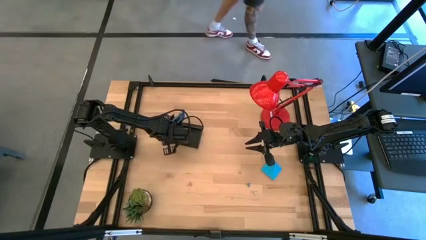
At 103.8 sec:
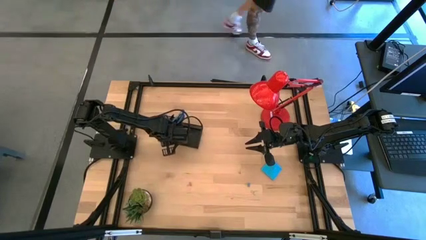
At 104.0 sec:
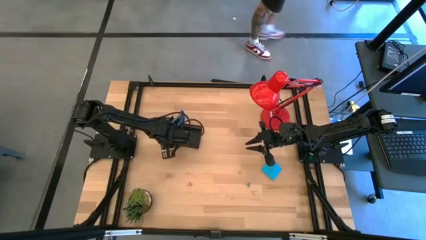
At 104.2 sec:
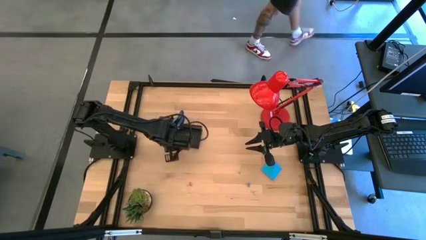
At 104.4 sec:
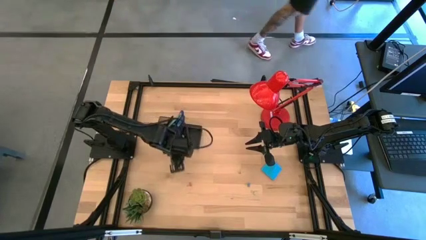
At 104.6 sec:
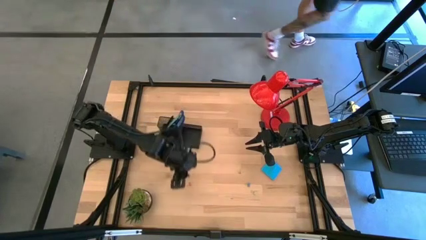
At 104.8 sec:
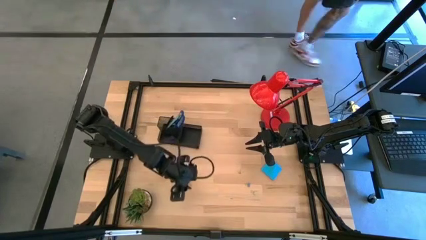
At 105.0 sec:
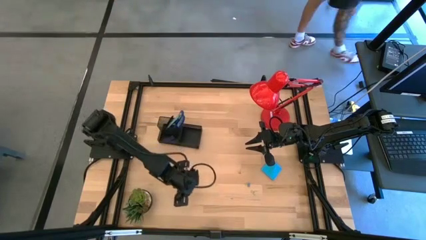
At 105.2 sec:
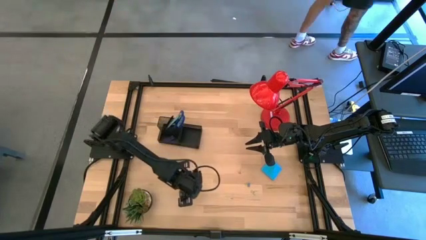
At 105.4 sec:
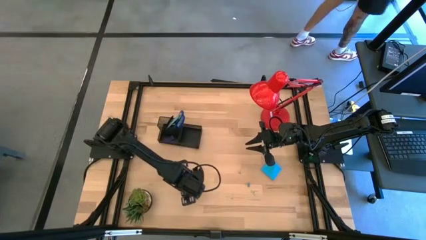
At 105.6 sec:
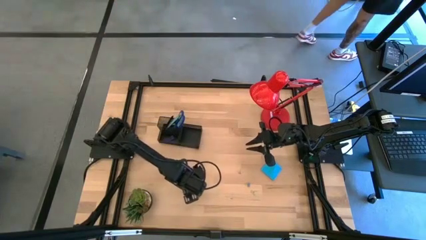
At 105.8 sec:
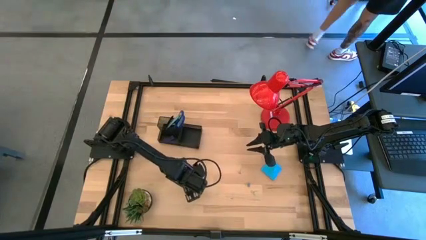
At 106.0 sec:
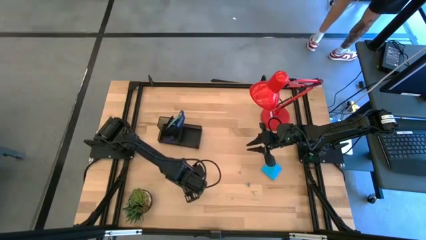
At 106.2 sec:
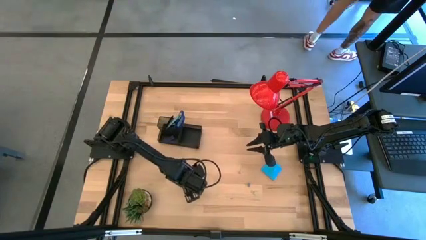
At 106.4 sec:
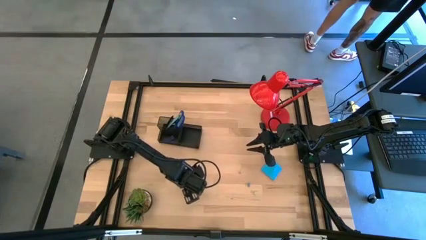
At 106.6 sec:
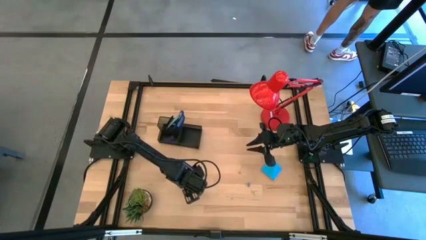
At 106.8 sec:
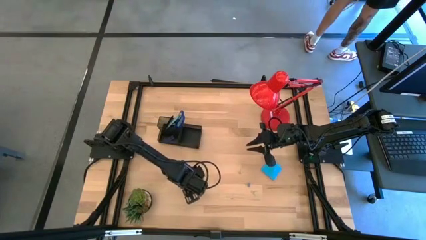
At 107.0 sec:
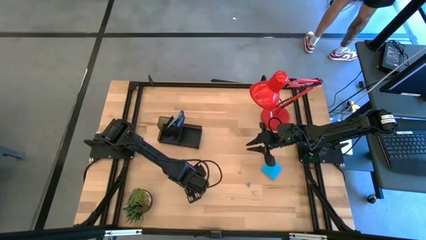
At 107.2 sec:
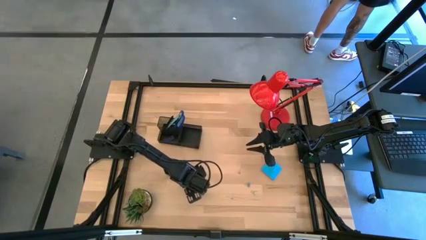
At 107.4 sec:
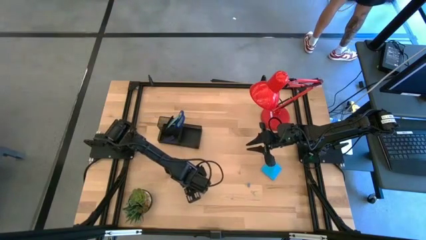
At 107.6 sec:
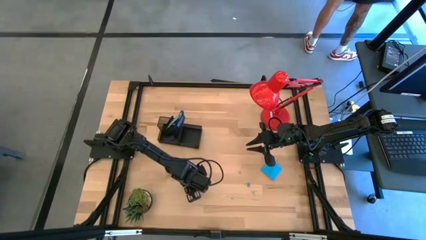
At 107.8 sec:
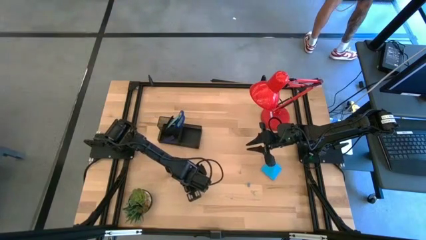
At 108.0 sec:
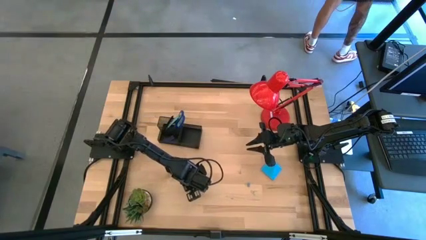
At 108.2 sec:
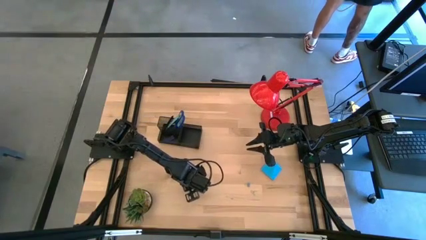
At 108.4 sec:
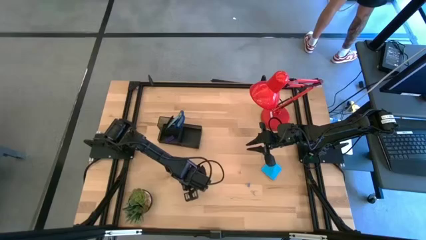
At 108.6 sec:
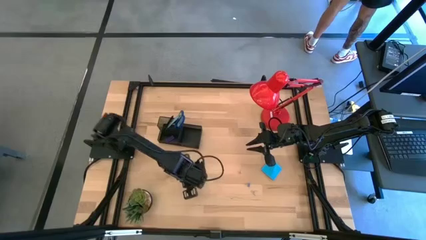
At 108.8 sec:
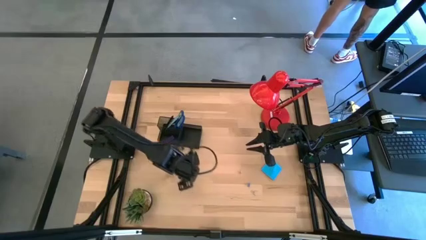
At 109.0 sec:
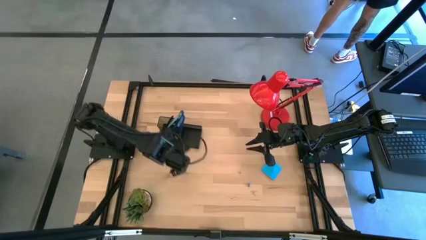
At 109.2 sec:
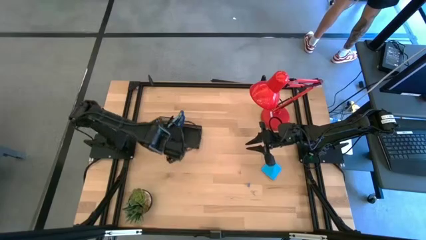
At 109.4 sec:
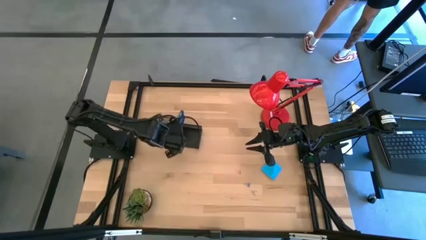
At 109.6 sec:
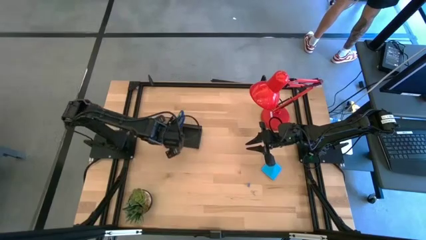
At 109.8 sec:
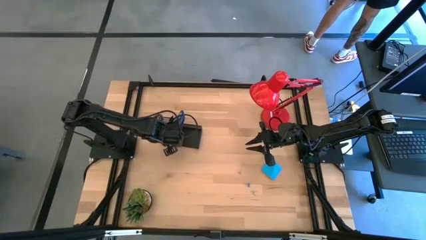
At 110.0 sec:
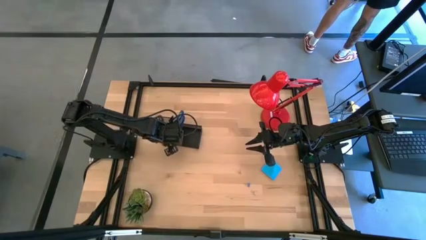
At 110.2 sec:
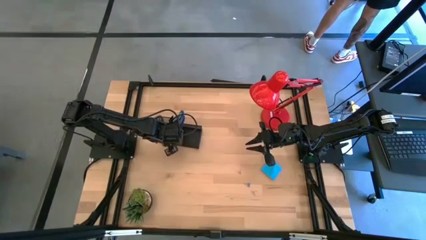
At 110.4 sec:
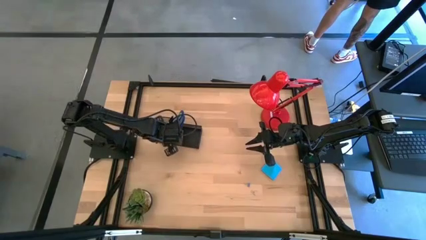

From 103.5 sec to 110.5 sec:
Task: Pick and place office supplies into organizer
Put the pink binder clip into the black desk organizer

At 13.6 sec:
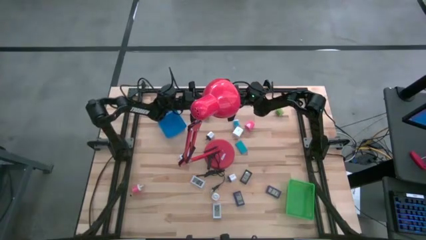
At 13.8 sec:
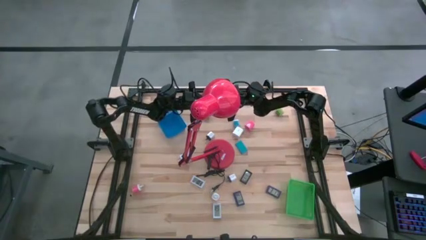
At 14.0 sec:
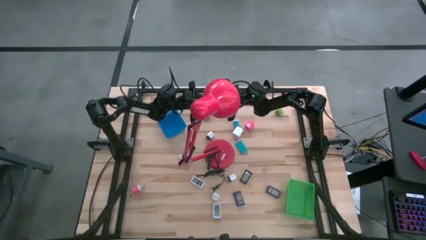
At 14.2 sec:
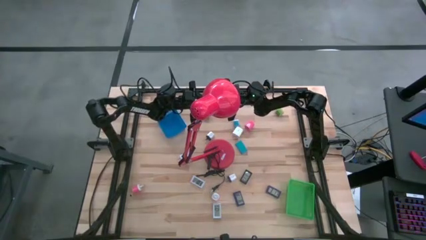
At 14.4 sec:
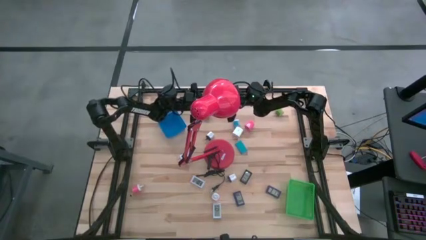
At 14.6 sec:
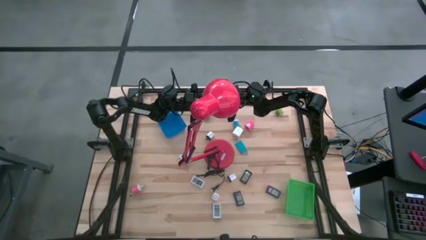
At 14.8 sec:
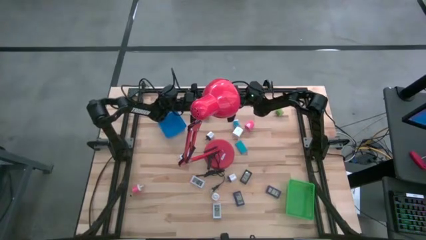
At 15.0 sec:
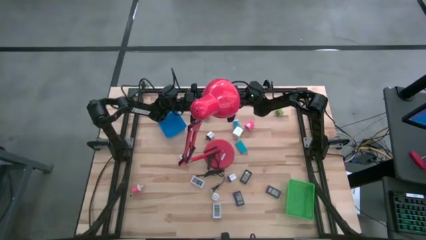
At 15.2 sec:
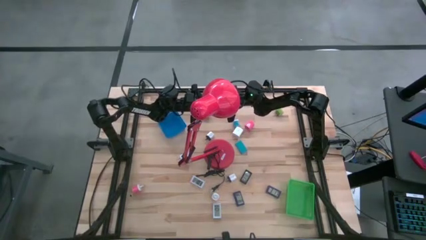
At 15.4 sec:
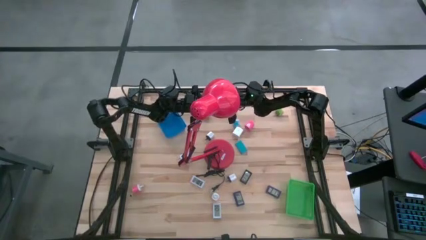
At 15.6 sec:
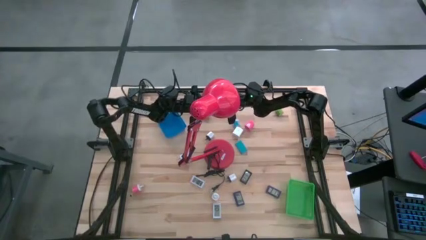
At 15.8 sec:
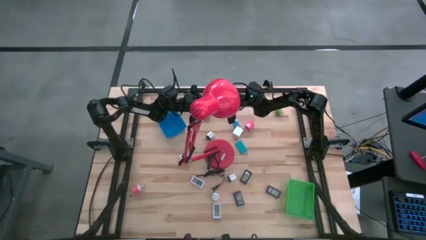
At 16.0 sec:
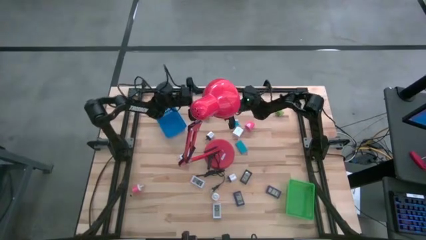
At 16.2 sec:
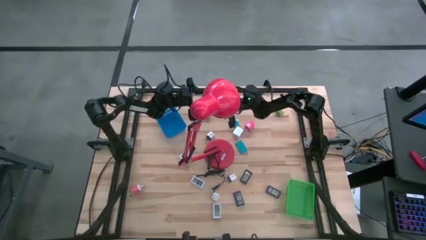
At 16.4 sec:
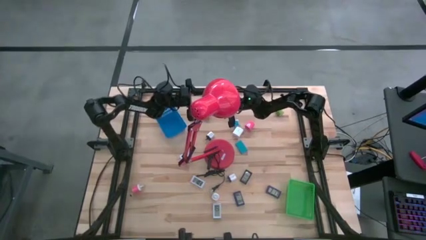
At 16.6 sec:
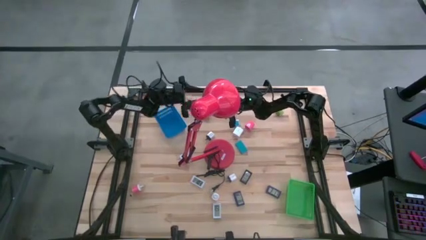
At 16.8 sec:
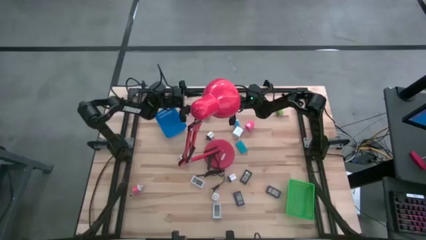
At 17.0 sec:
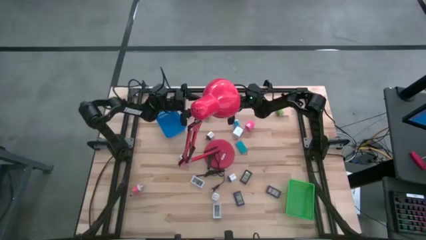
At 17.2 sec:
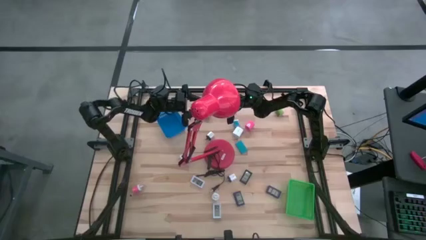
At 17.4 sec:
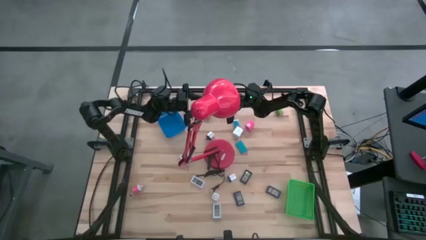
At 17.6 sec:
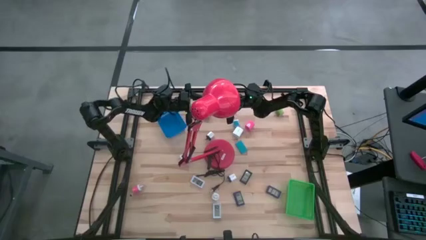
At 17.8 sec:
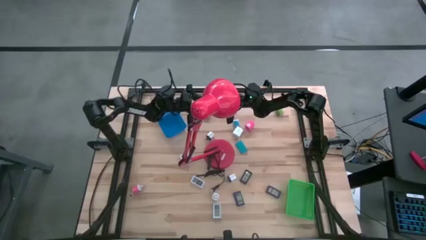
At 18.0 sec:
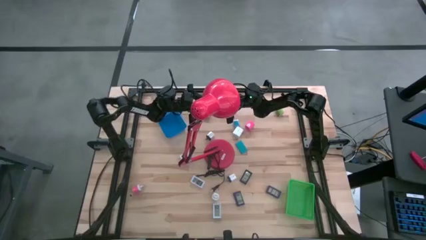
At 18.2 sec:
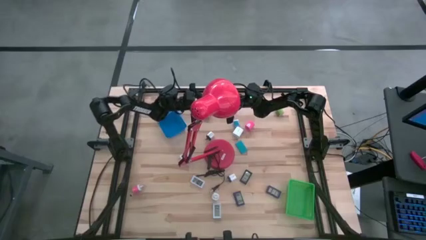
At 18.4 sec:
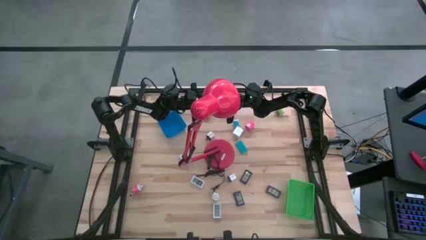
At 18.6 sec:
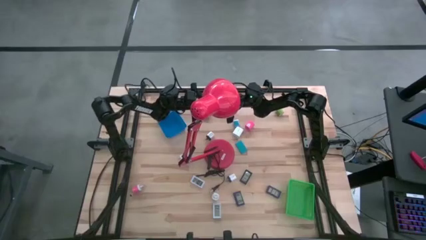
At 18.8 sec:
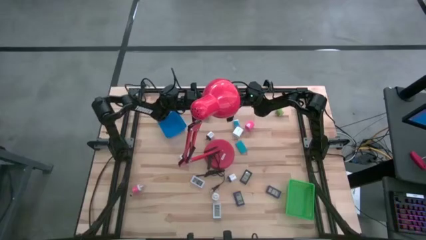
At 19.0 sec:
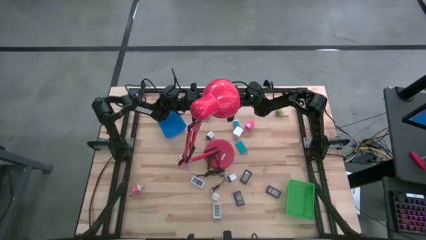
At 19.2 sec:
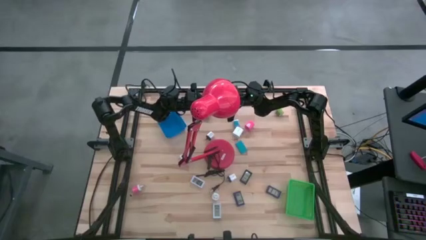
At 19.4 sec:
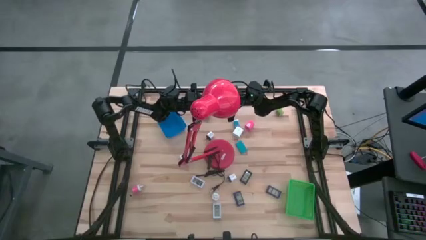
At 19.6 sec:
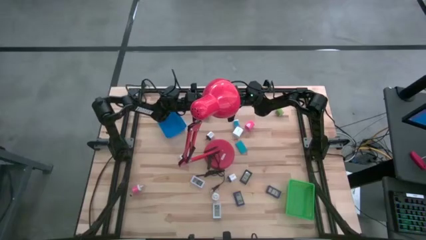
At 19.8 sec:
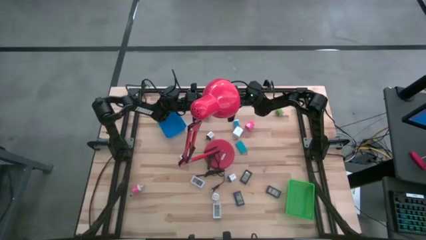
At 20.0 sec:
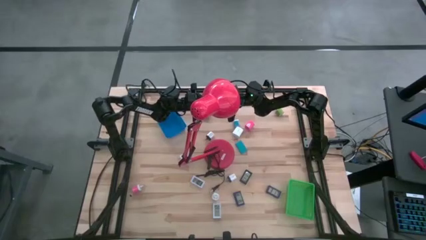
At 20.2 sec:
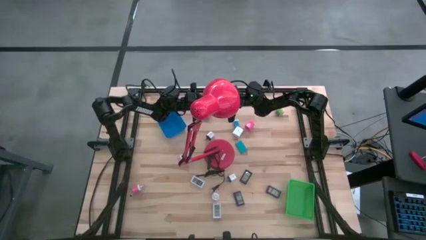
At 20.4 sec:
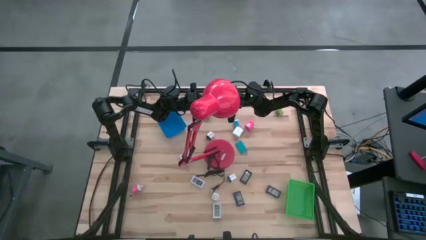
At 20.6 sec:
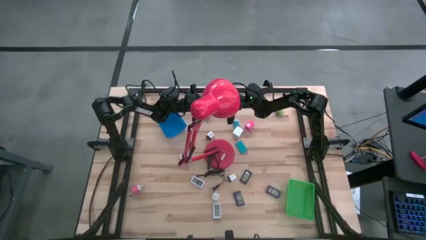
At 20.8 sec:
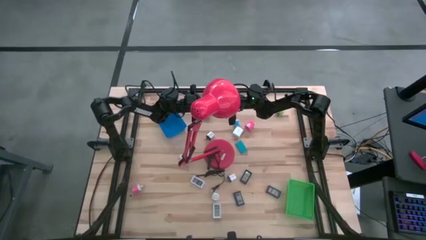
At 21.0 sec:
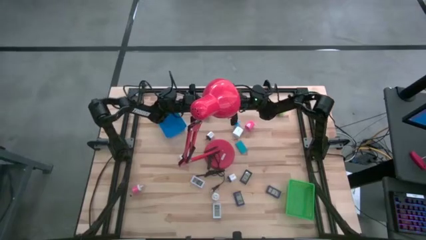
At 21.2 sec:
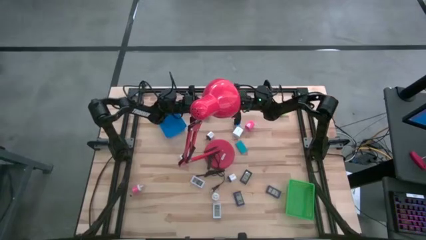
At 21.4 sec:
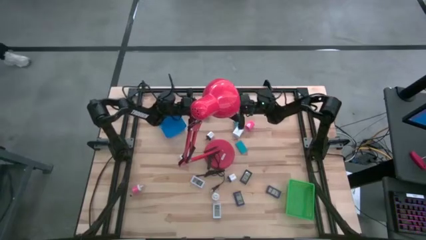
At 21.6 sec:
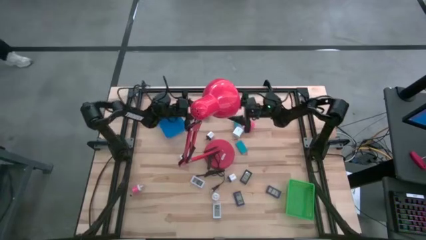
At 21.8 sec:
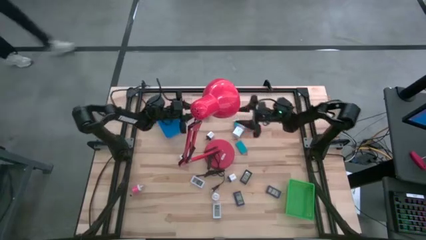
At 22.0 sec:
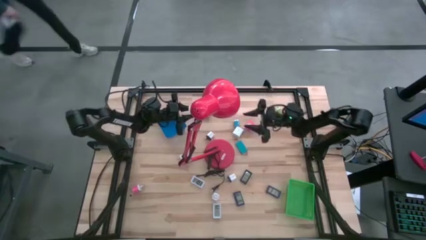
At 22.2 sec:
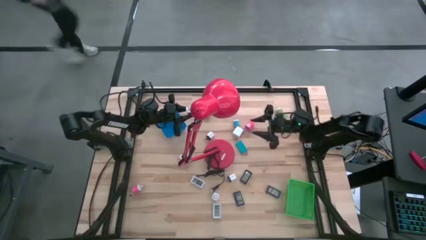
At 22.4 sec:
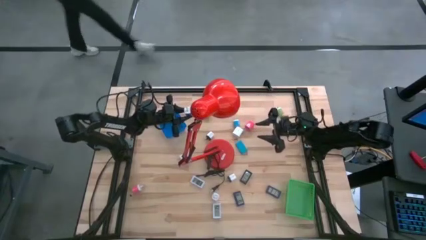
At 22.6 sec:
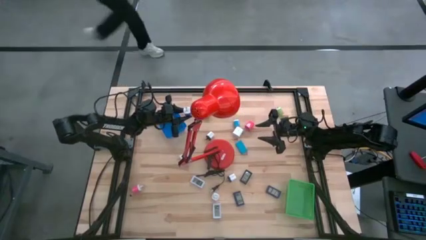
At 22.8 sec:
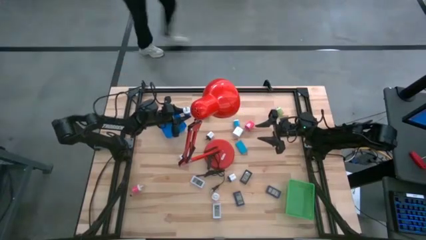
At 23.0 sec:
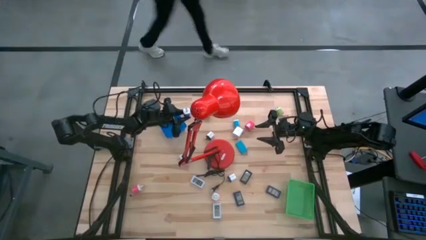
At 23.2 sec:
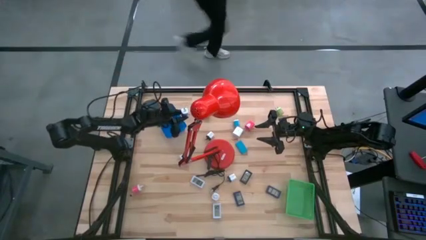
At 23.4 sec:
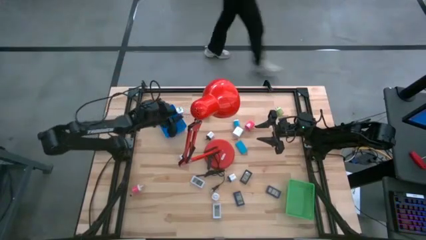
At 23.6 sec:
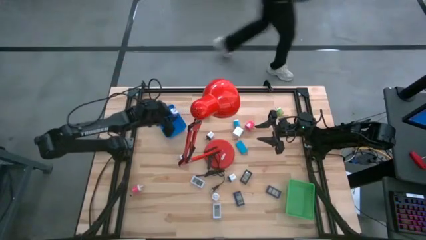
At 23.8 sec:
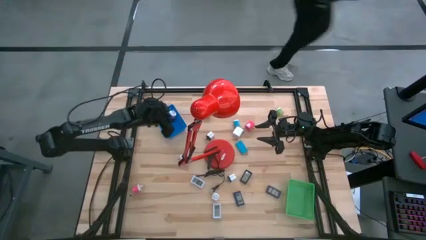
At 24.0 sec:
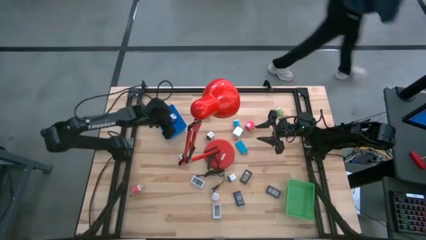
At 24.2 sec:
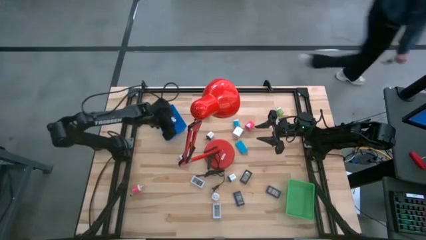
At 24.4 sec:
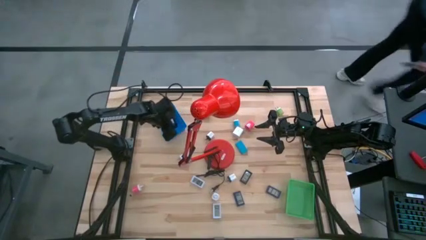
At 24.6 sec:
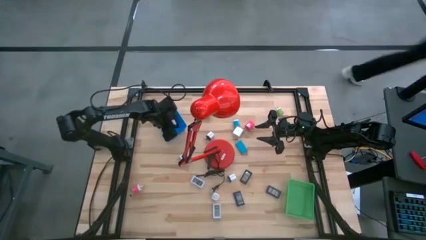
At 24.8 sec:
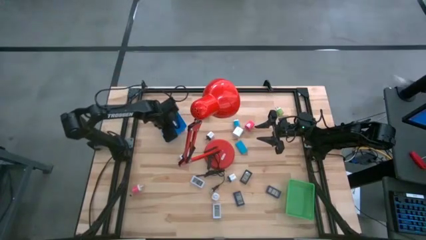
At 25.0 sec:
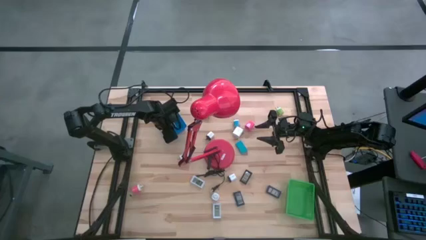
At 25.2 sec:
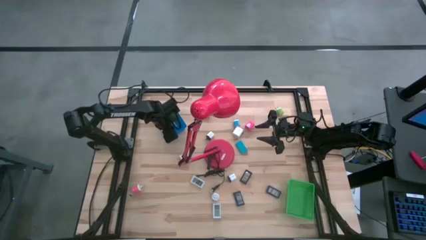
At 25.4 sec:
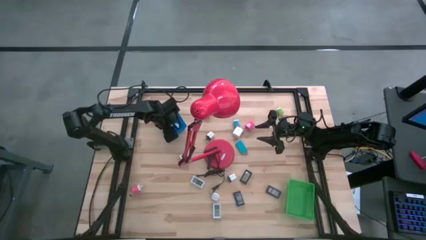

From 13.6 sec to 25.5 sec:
Task: Pick & Place Office items
Put the purple charger adapter into the blue bin
